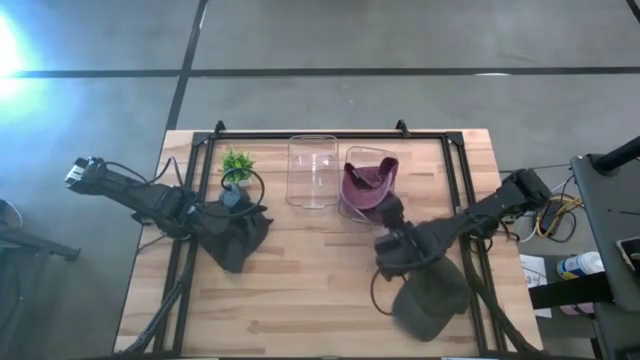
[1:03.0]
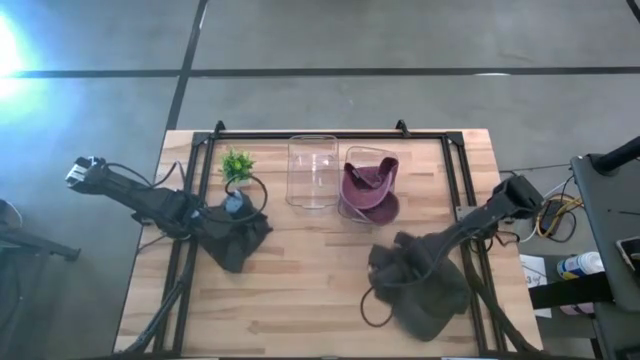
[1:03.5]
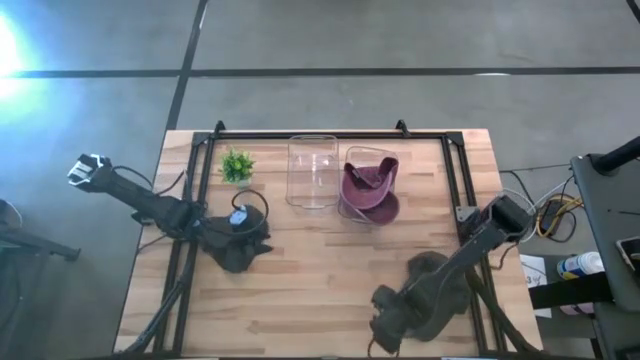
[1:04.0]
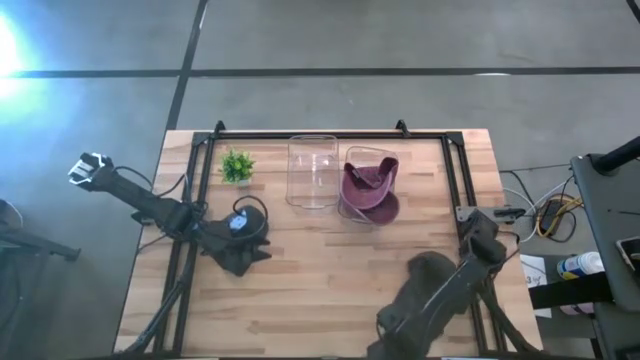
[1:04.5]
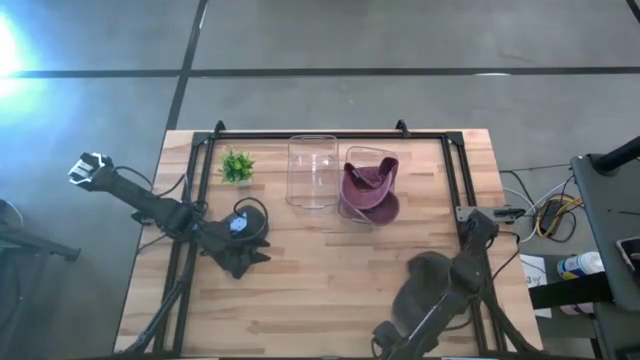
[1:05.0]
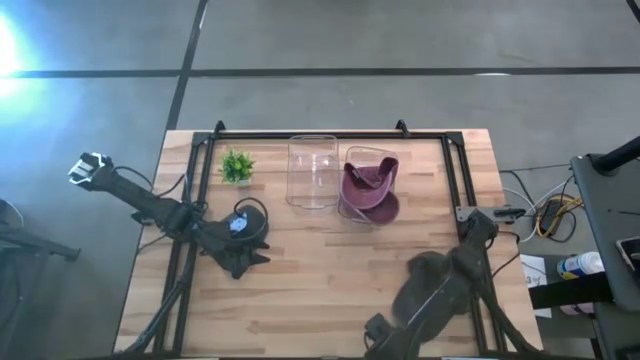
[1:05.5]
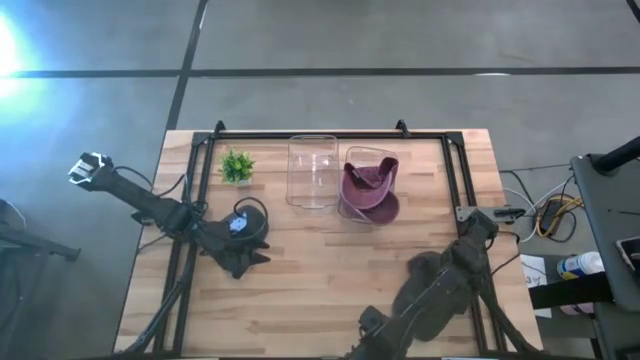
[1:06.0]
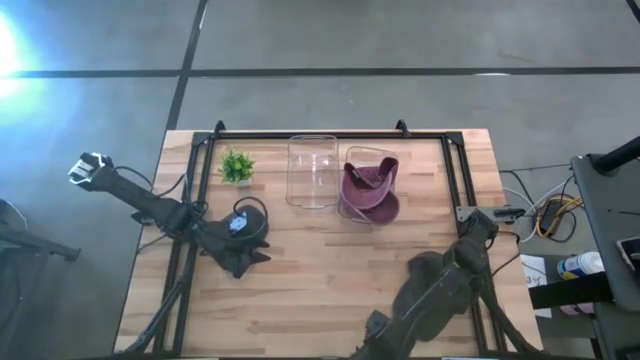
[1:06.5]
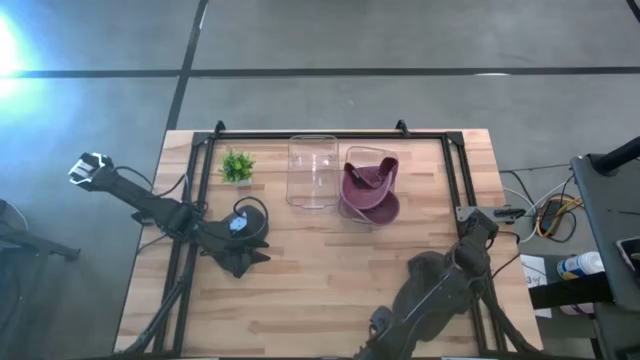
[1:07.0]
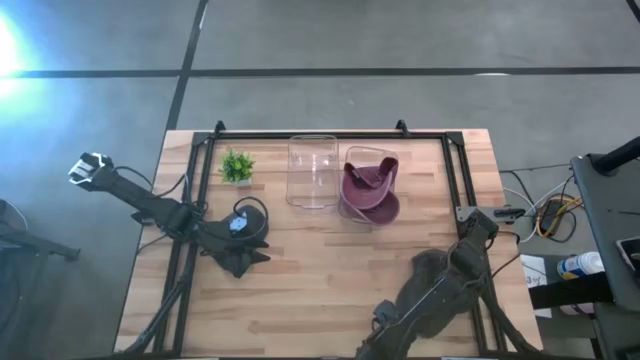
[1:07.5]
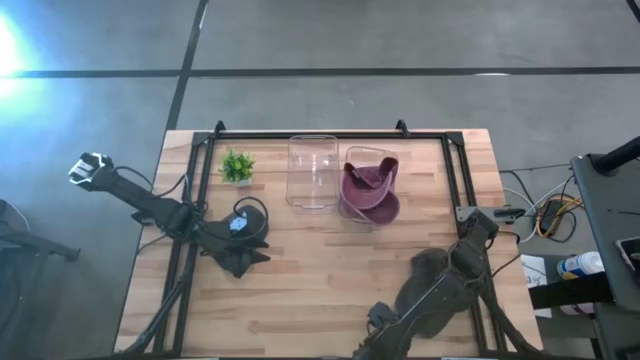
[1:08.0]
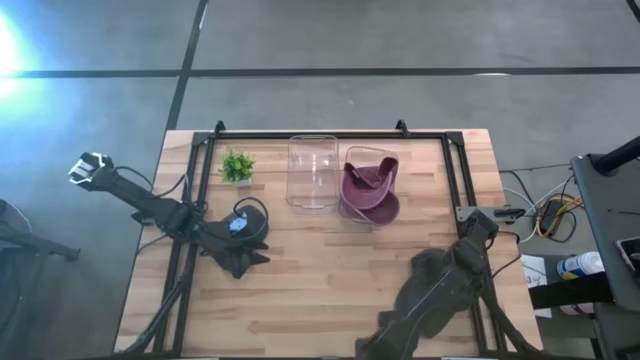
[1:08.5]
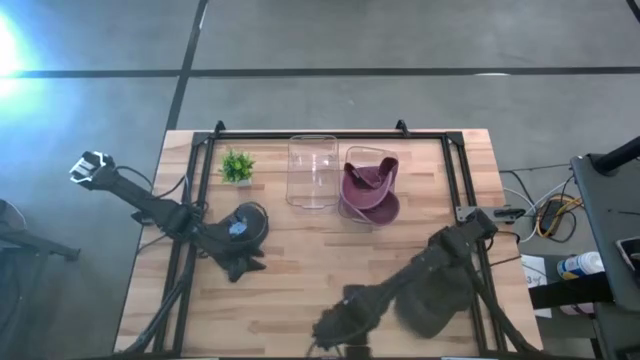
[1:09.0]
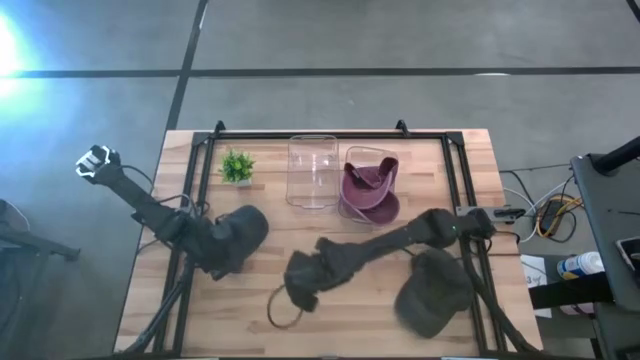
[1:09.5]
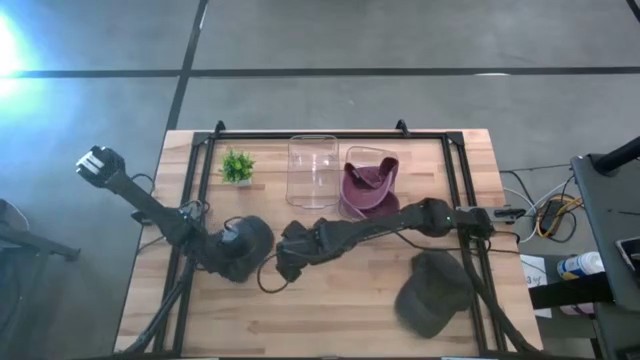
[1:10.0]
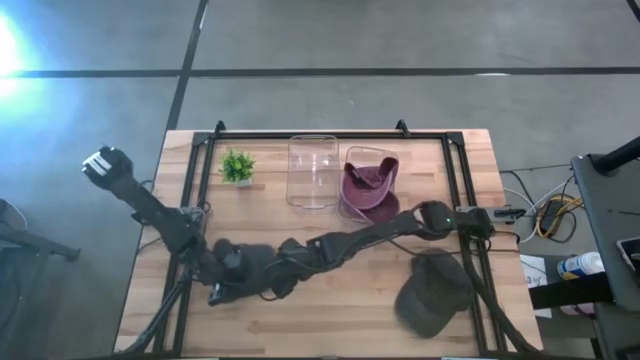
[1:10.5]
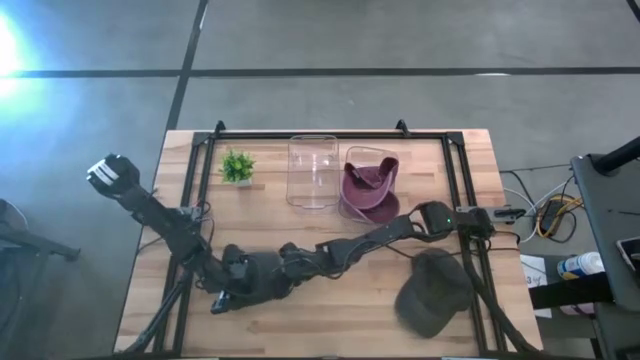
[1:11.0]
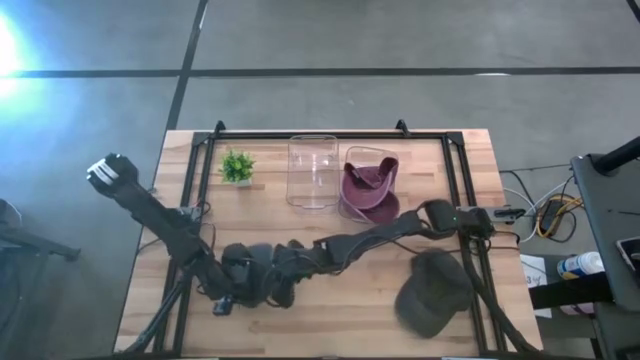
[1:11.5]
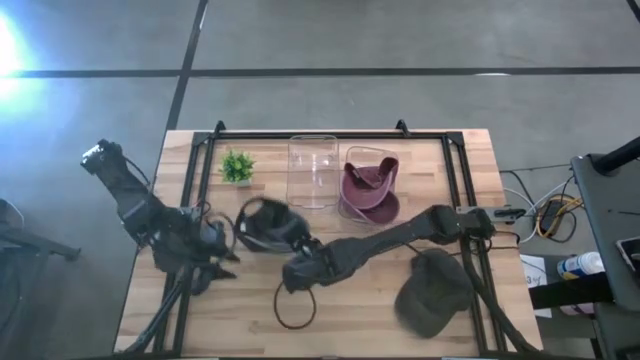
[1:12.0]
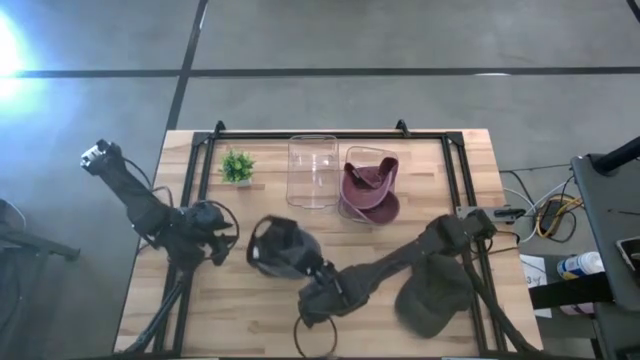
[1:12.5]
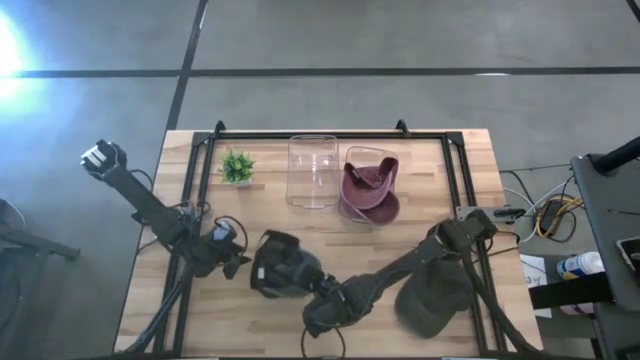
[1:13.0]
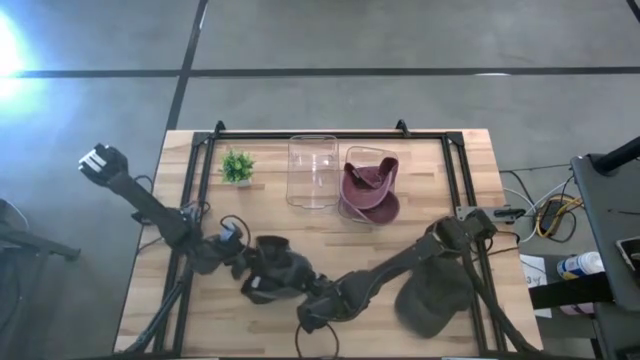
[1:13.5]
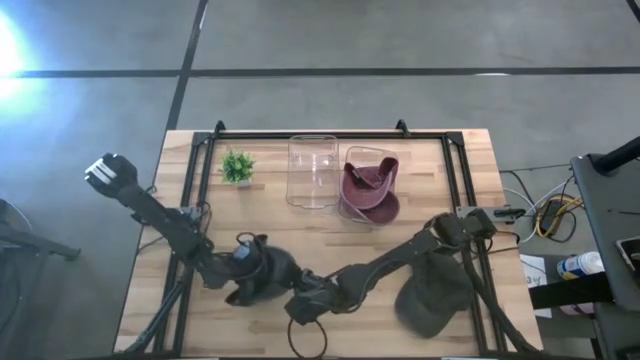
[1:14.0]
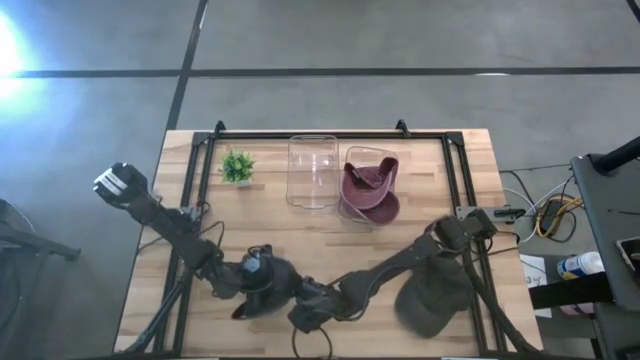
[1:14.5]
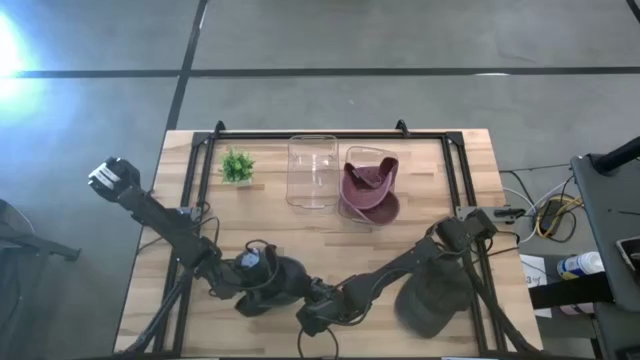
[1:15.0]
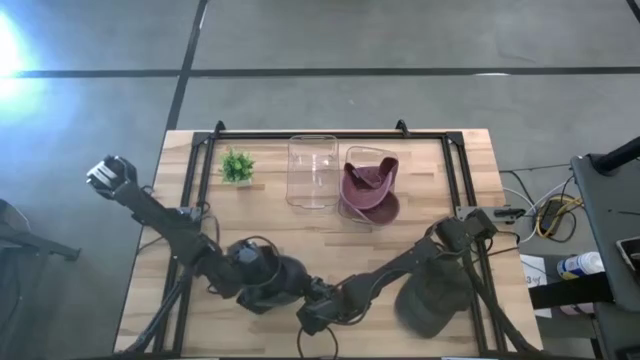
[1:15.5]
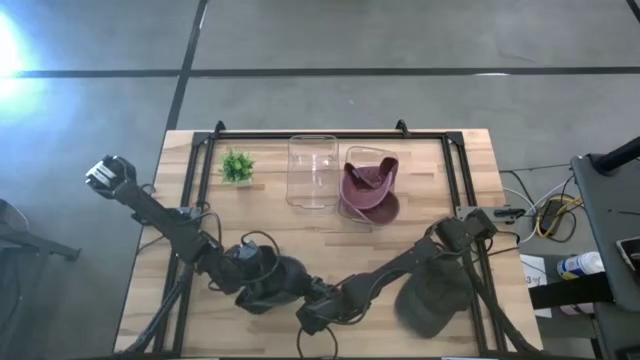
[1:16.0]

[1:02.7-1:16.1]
Task: Pick & Place hat
Put the left black cap into the left transparent bin

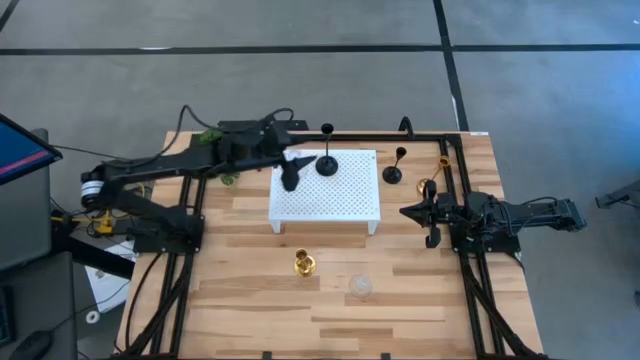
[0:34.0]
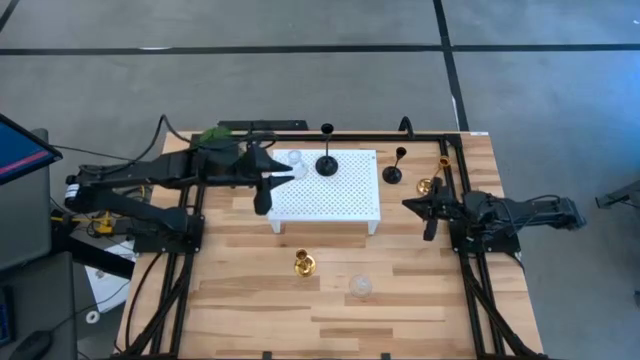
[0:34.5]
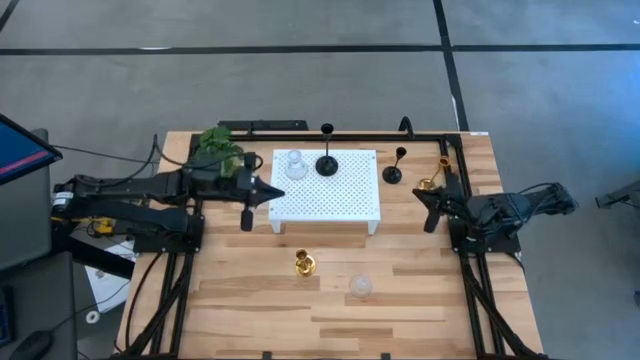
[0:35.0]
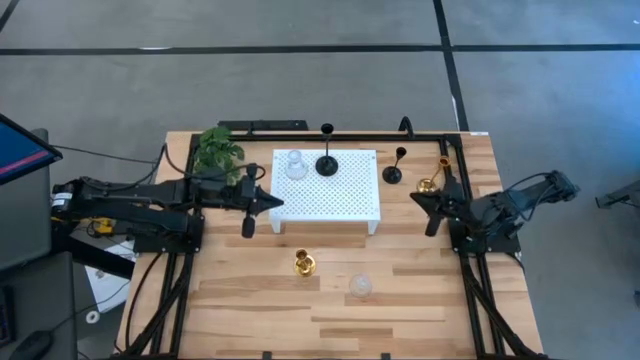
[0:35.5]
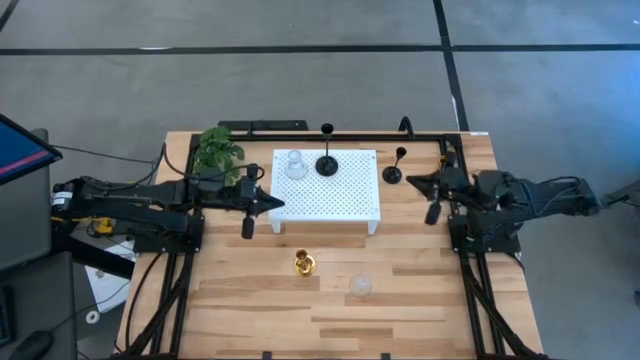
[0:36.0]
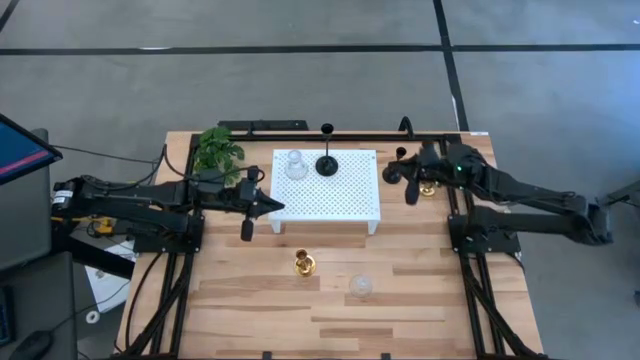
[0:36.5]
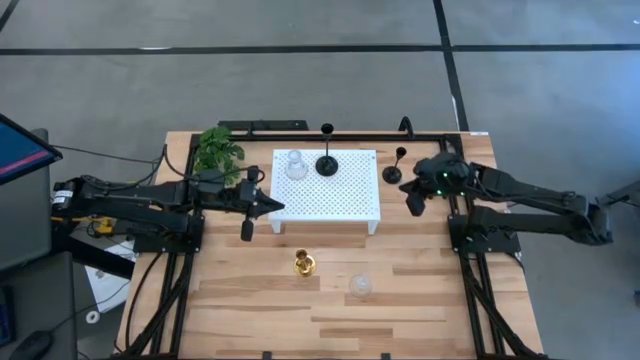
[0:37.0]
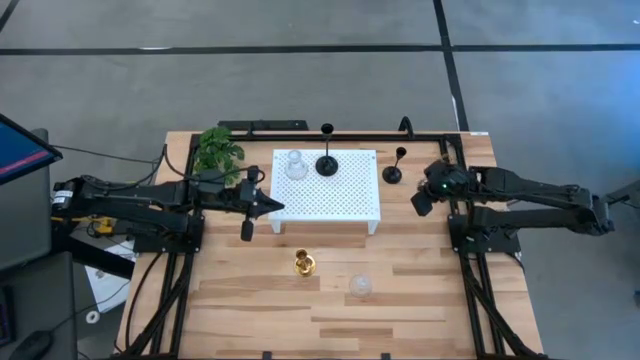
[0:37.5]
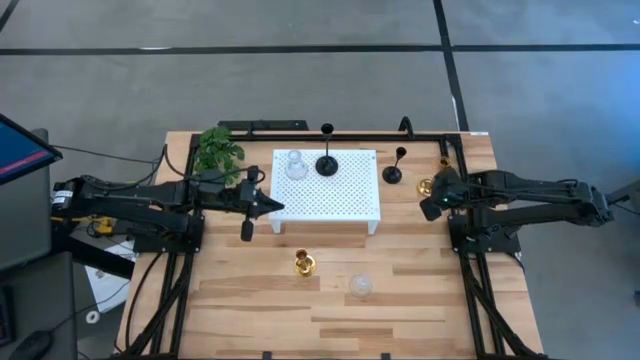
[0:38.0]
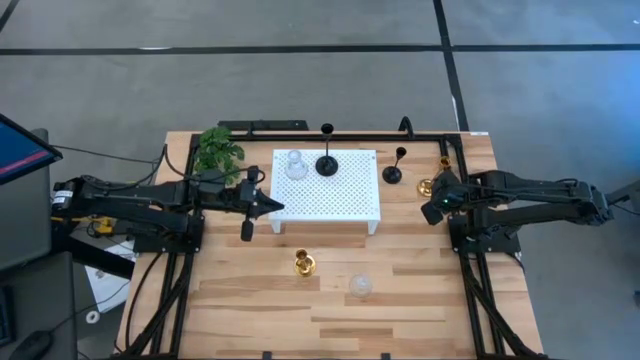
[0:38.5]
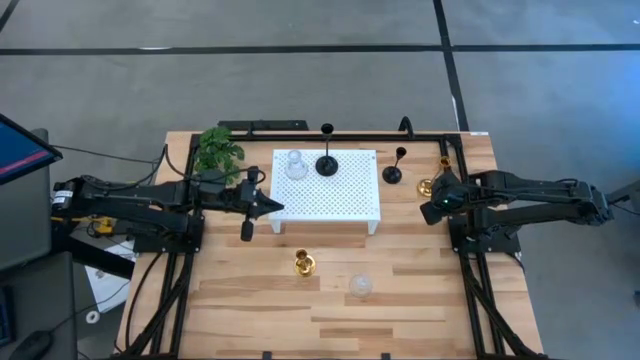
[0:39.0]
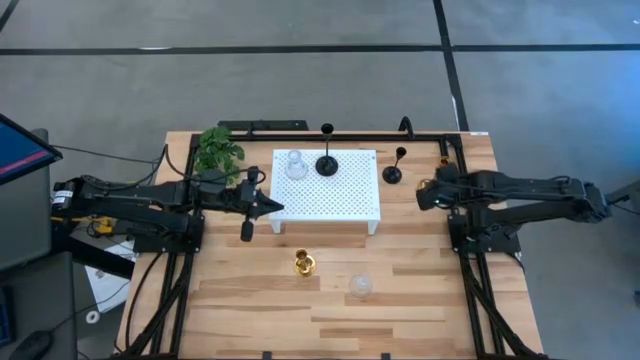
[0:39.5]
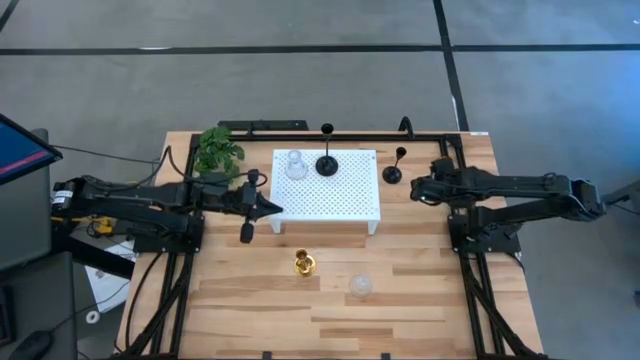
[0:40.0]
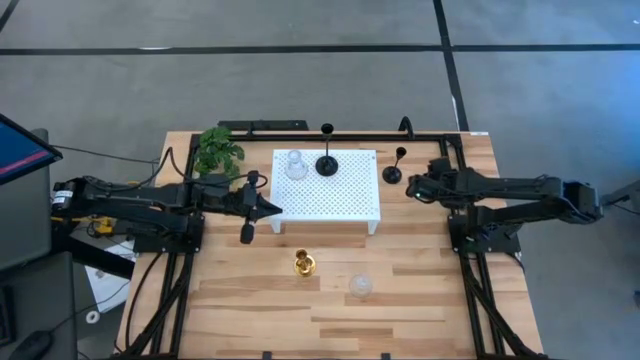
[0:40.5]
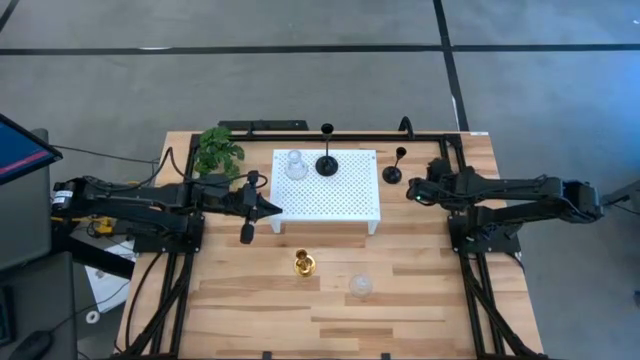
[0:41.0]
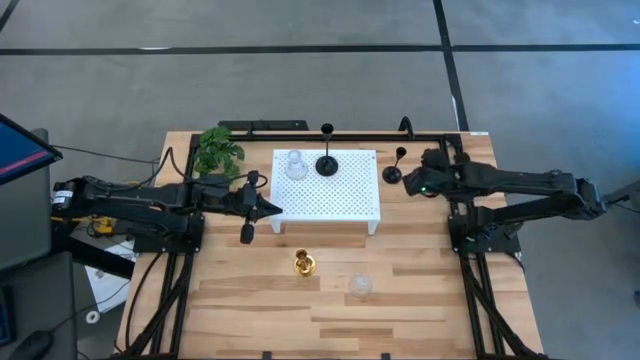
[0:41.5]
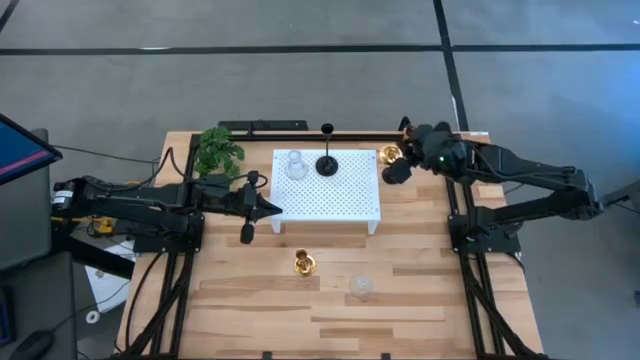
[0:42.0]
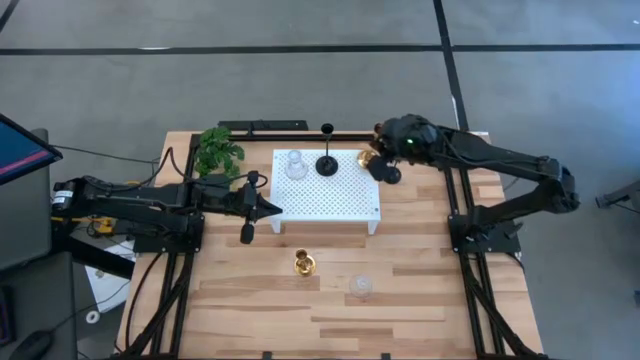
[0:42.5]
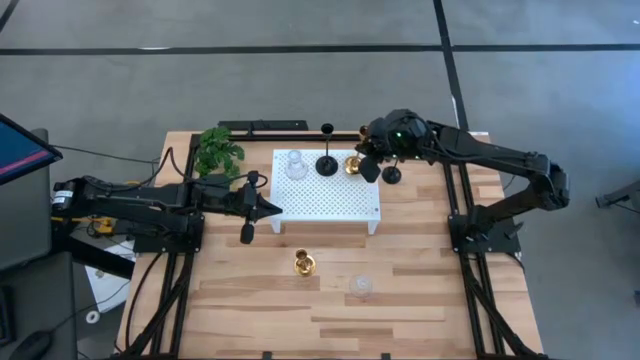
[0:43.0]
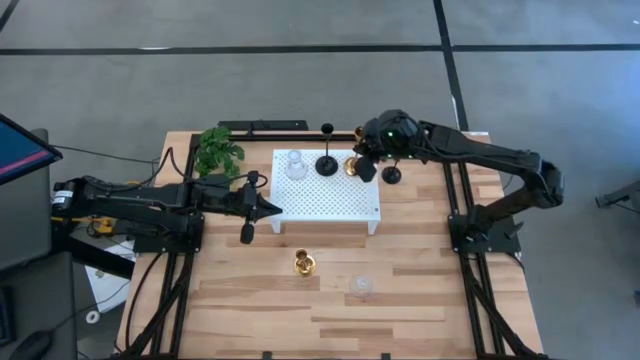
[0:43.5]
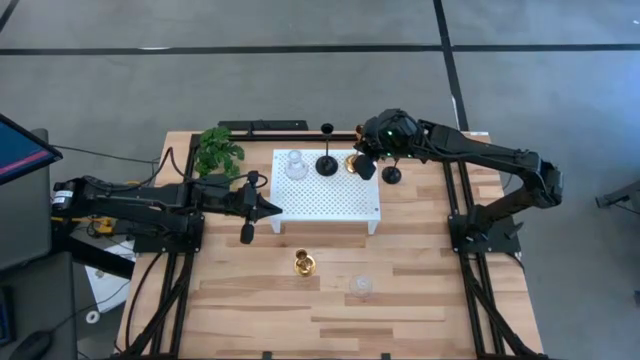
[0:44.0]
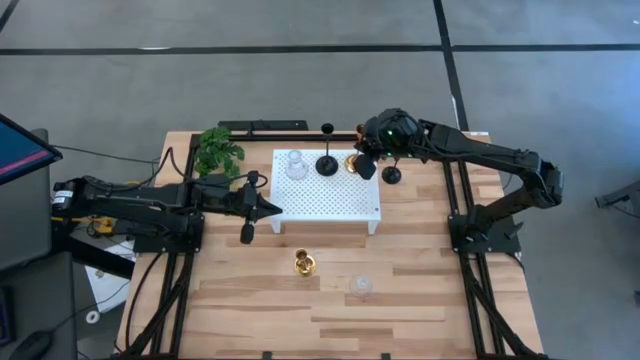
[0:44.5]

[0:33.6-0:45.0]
Task: Pick & Place candle stick holders
Put the top gold candle holder on the shelf
